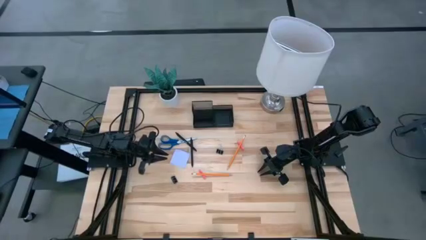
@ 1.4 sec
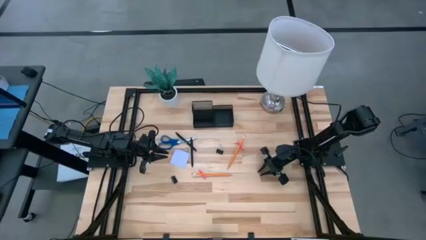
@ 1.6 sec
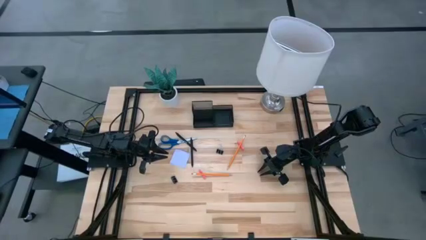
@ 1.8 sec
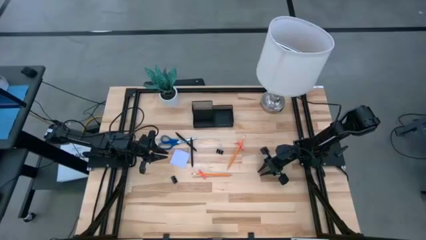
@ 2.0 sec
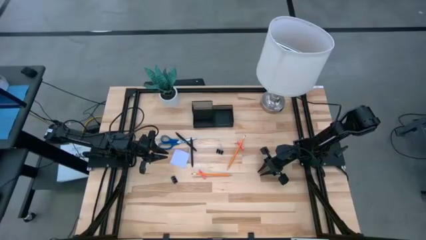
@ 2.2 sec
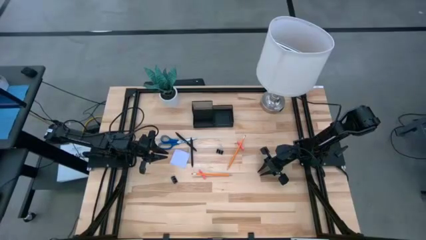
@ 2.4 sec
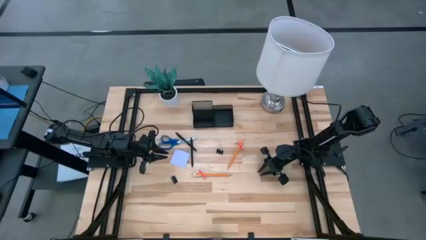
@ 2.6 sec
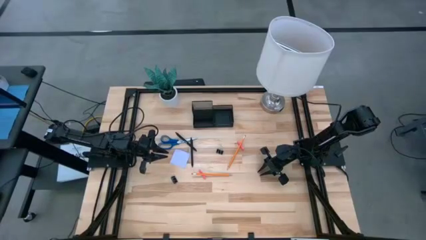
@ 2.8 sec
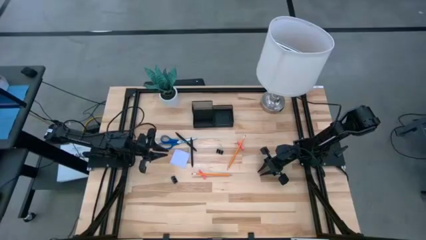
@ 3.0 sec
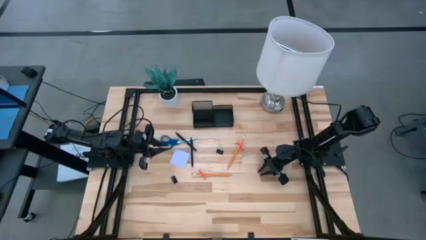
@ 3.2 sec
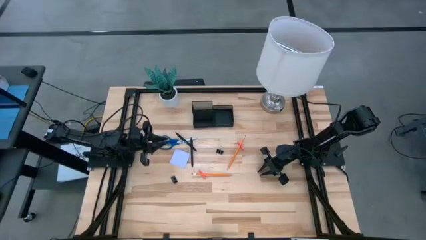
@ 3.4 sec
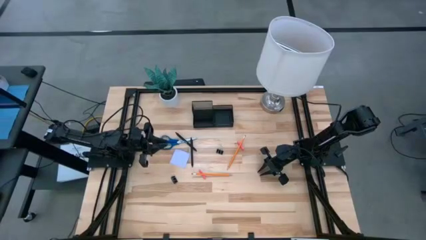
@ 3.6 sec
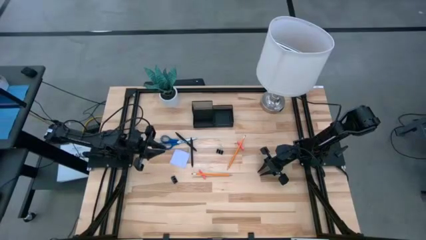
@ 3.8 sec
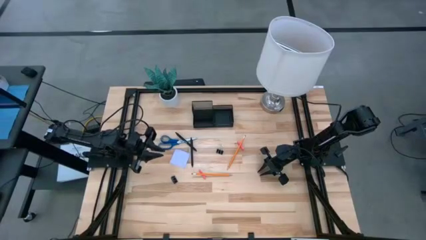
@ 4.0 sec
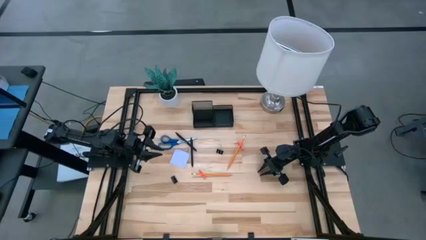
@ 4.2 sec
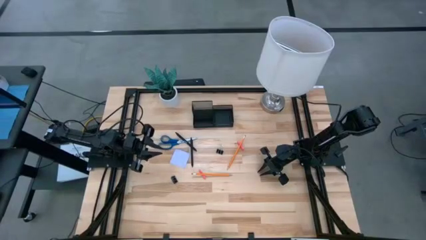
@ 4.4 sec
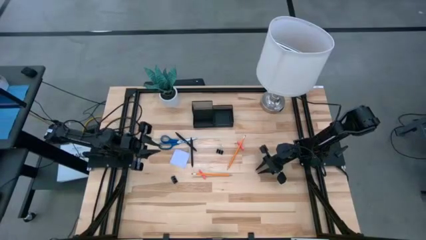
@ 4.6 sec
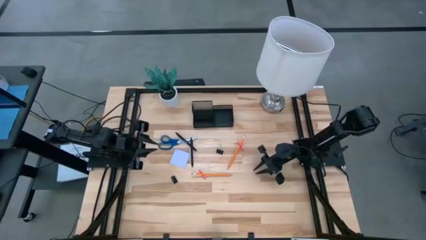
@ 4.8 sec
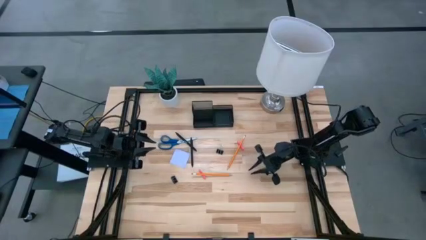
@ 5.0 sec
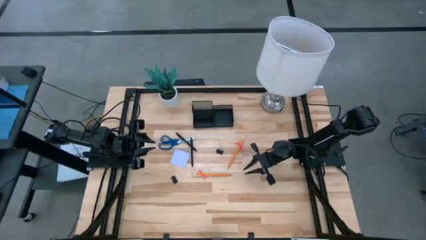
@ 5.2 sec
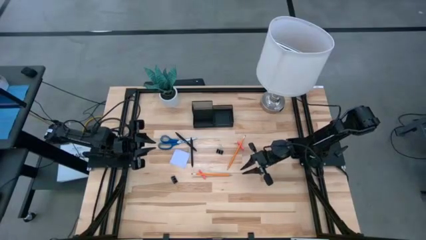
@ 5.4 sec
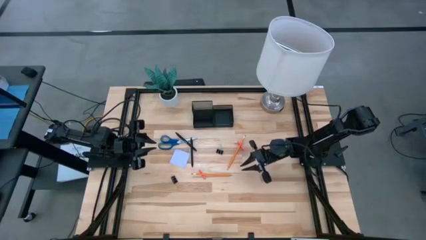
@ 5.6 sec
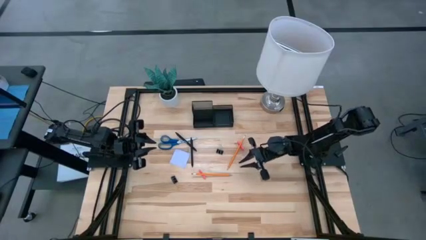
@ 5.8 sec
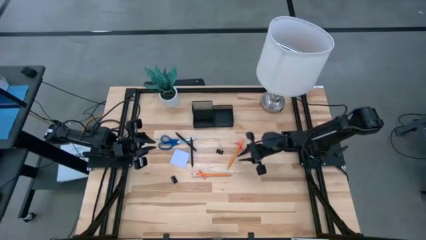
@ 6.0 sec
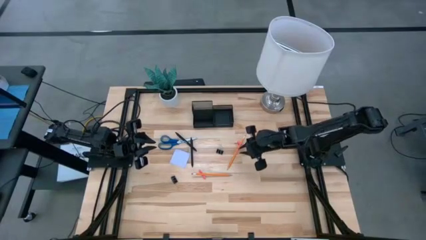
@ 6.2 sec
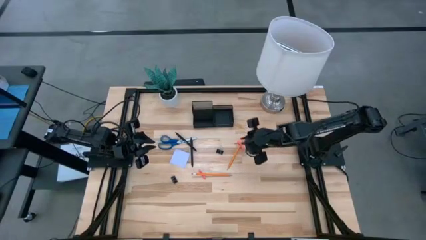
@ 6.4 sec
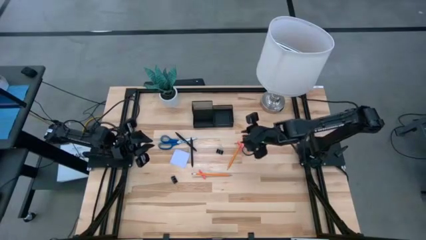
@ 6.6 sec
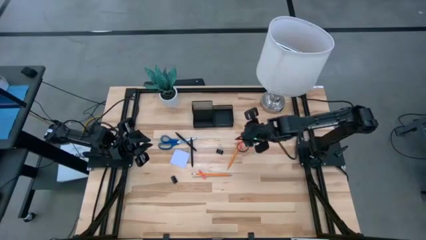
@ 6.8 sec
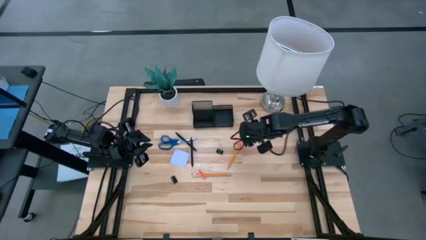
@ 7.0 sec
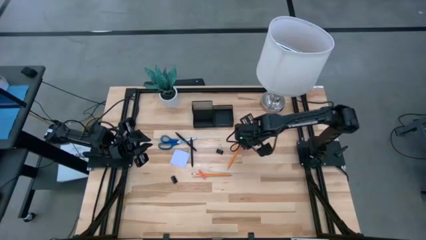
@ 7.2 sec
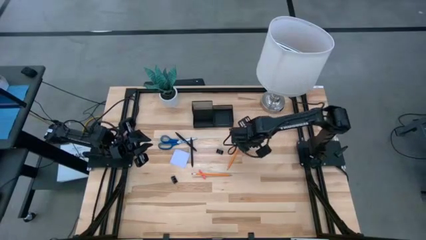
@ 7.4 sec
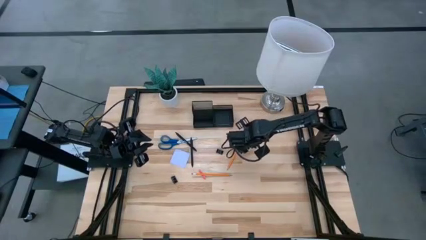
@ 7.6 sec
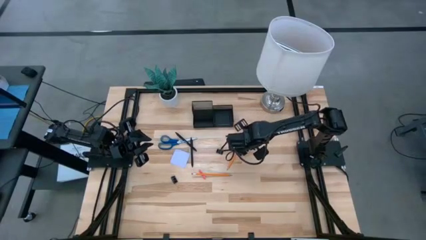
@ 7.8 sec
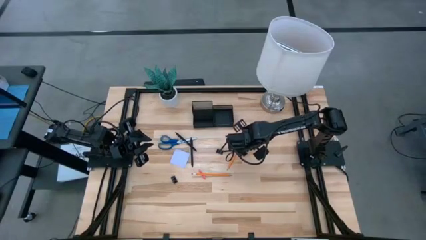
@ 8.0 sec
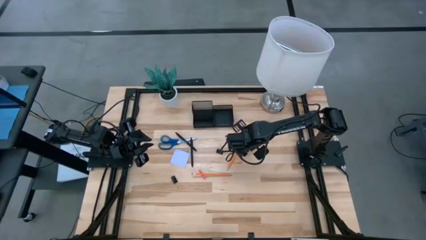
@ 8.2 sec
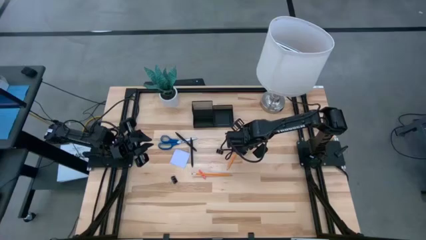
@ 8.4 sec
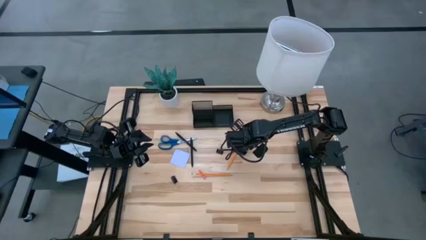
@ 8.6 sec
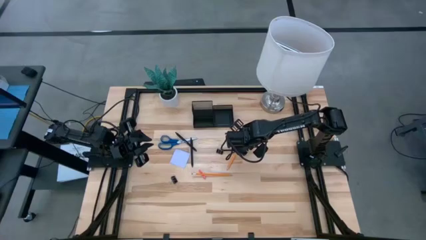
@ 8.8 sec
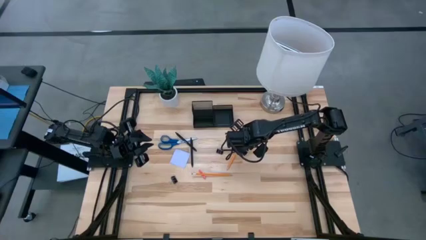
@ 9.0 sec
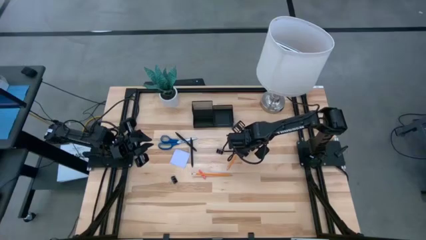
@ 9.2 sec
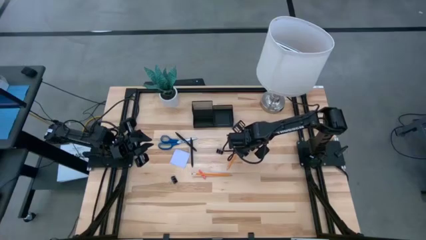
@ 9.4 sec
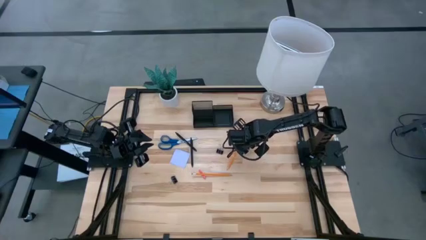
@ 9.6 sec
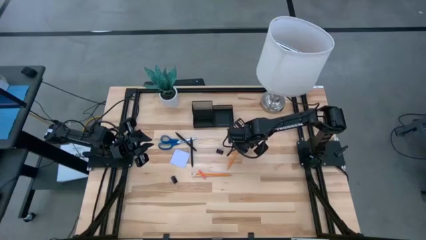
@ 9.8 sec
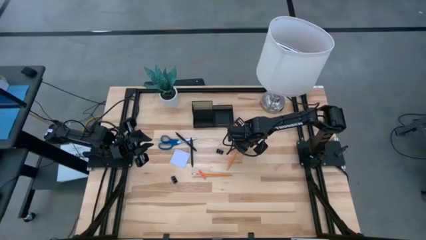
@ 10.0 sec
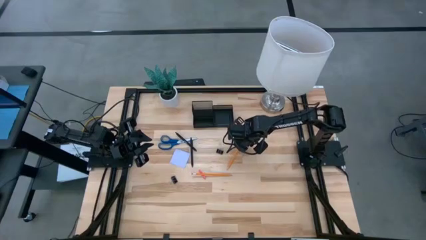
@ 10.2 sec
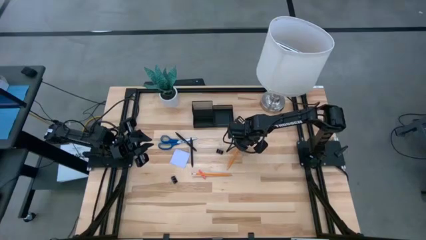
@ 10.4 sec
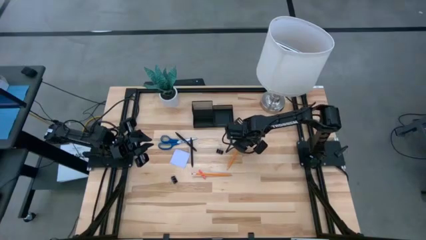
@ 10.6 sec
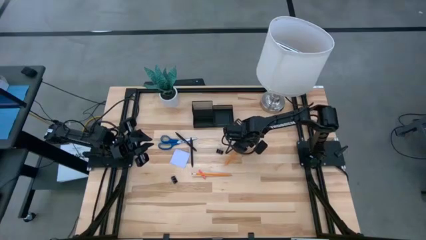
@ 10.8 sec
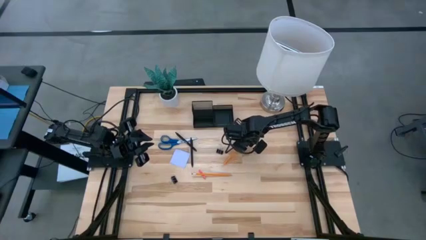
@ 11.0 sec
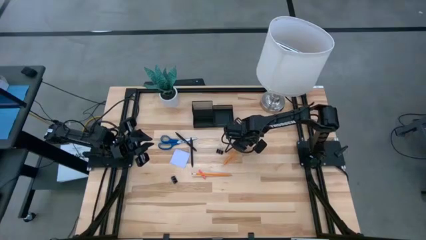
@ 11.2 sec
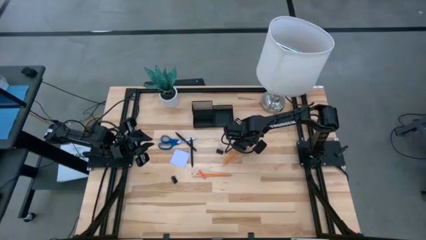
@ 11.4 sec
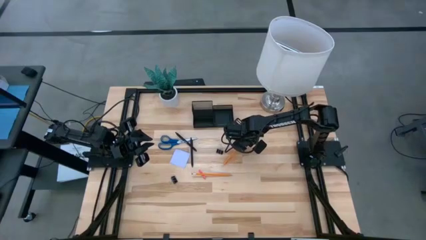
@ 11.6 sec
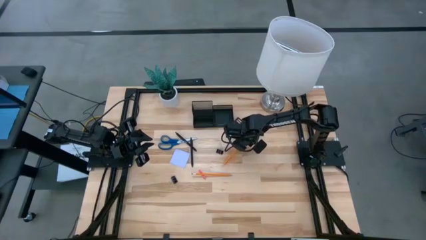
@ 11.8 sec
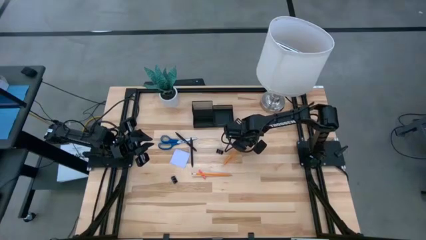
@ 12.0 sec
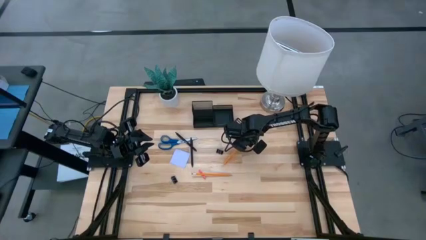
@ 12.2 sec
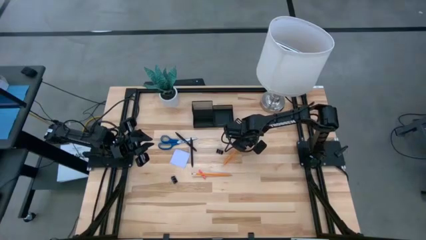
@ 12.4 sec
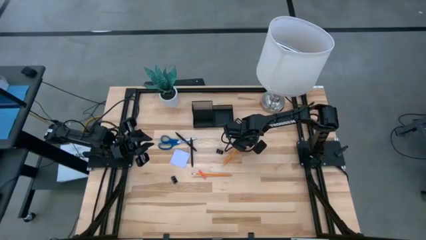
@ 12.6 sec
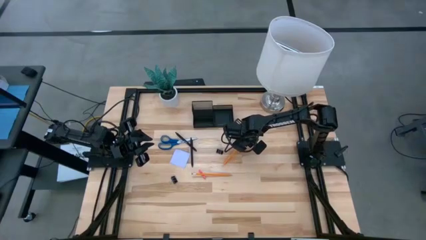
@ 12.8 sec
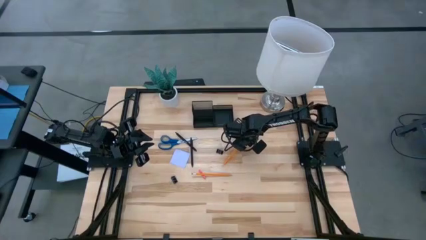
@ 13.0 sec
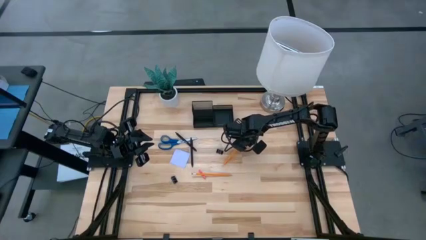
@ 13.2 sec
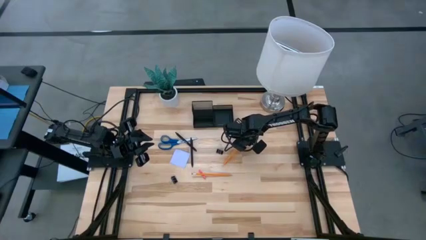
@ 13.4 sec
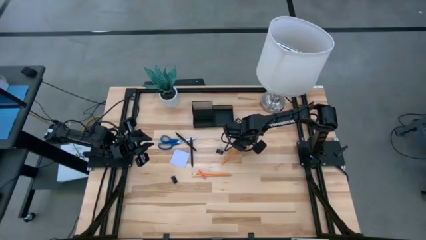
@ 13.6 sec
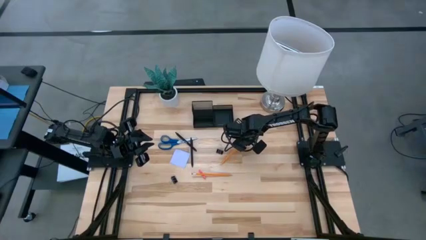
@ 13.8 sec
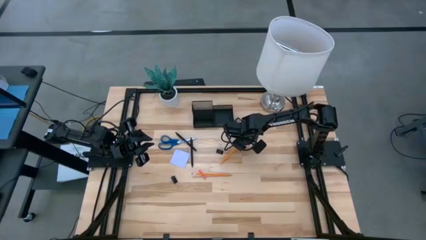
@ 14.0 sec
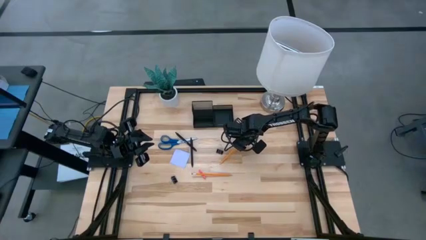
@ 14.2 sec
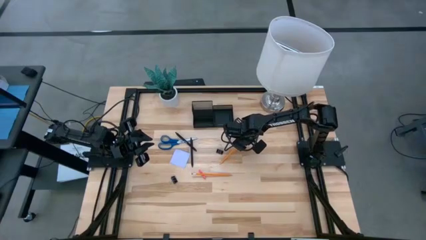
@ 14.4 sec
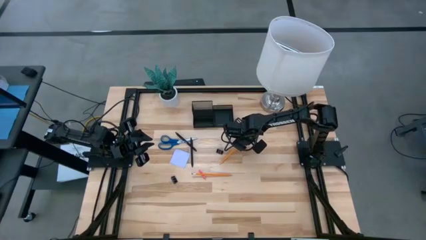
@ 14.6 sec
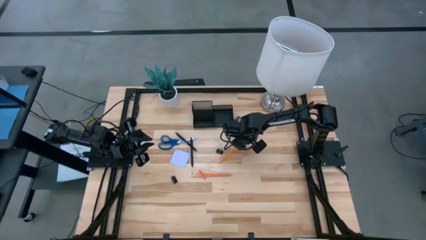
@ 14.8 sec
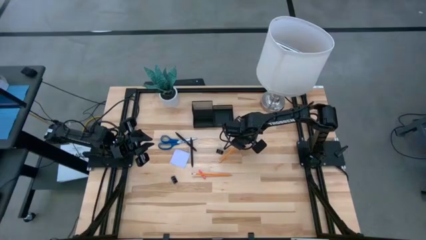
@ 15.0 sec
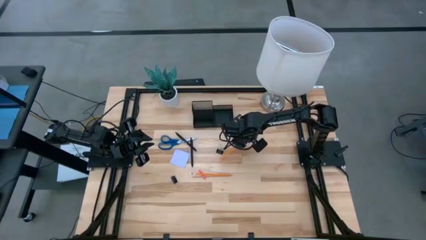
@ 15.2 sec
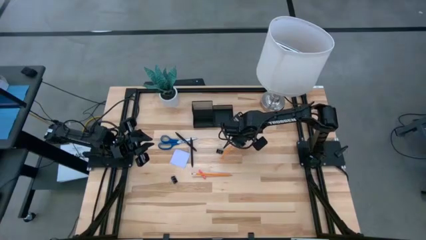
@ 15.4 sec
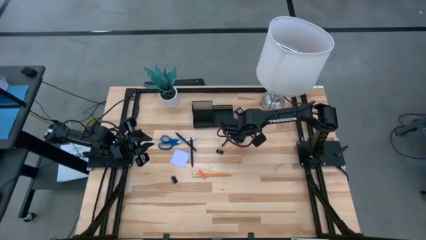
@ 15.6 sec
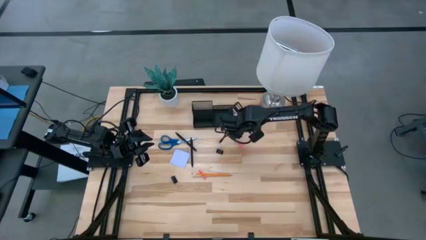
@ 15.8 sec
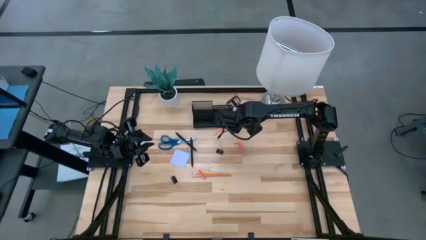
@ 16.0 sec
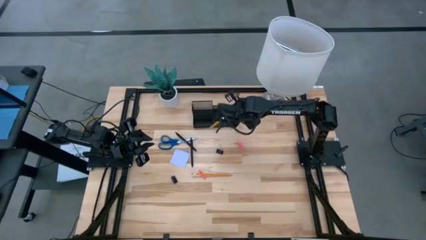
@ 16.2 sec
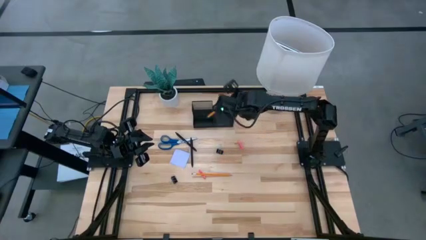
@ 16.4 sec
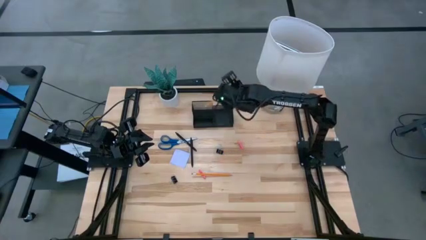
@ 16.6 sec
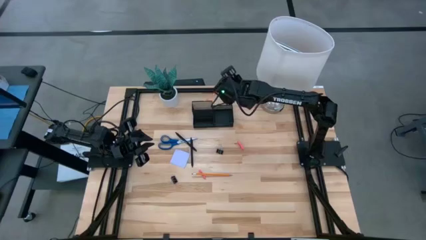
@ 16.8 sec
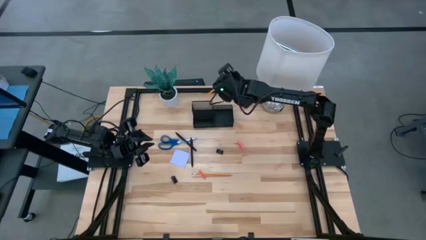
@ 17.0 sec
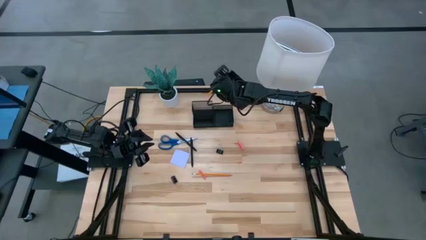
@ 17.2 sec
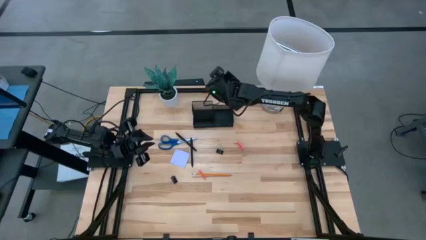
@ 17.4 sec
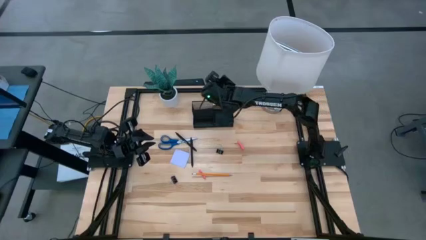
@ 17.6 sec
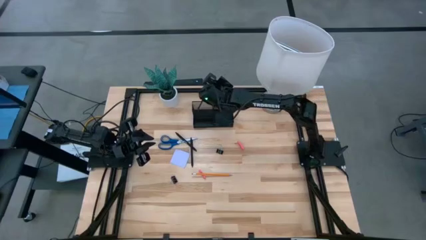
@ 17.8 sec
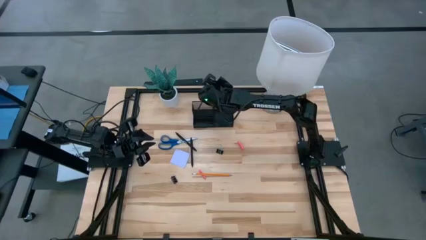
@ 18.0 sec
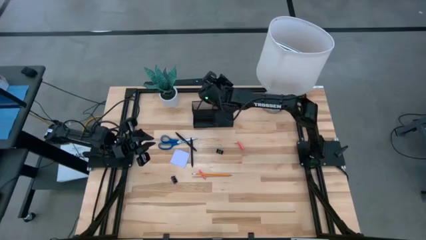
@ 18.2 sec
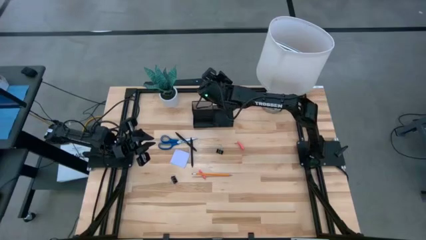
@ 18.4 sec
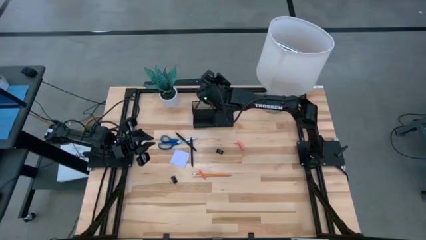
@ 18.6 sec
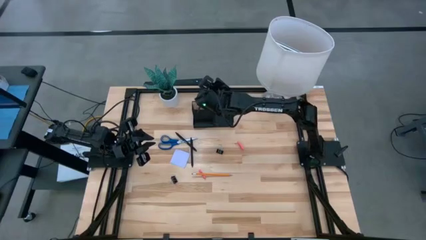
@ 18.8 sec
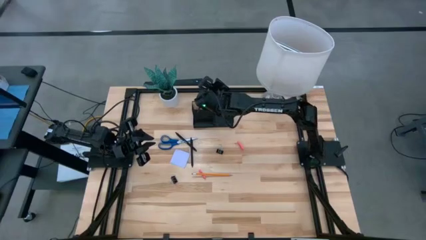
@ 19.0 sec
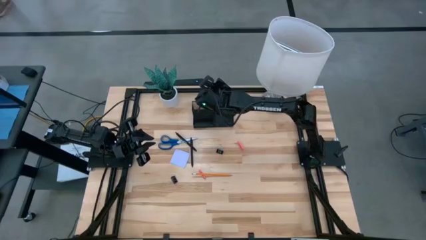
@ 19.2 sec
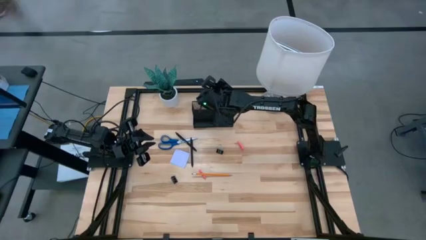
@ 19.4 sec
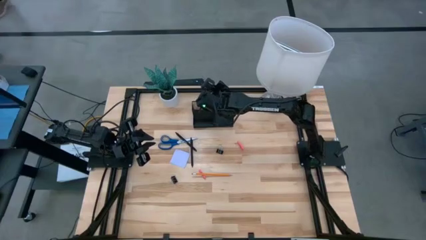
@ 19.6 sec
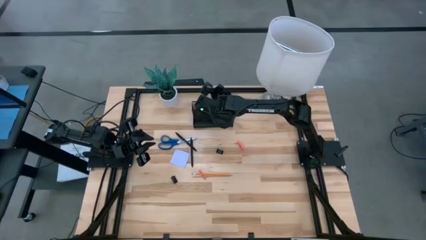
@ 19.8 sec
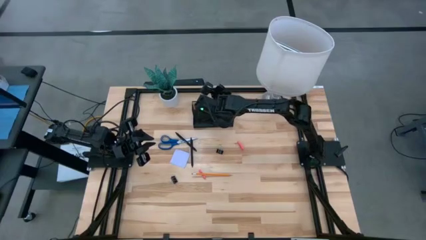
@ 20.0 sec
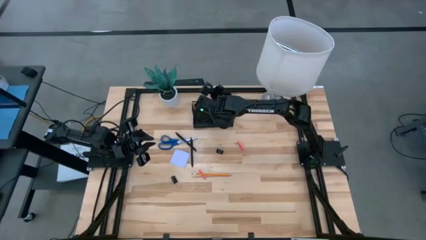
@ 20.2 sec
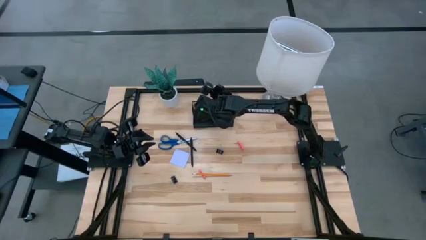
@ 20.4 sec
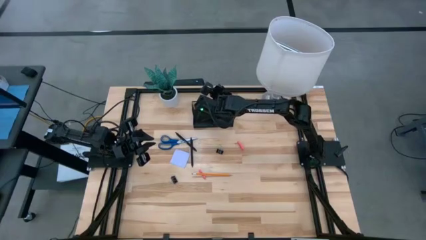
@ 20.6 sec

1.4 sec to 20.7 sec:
Task: Pick and place office supplies into organizer
Put the top yellow pencil into the desk organizer
